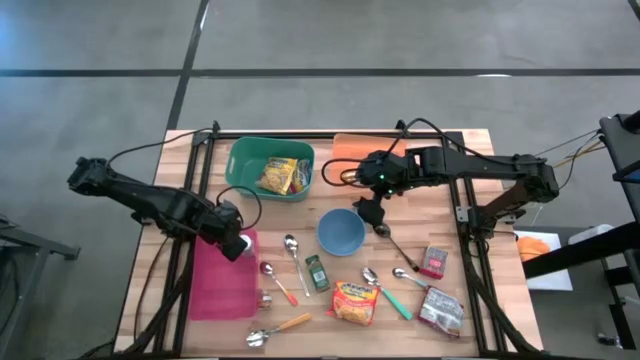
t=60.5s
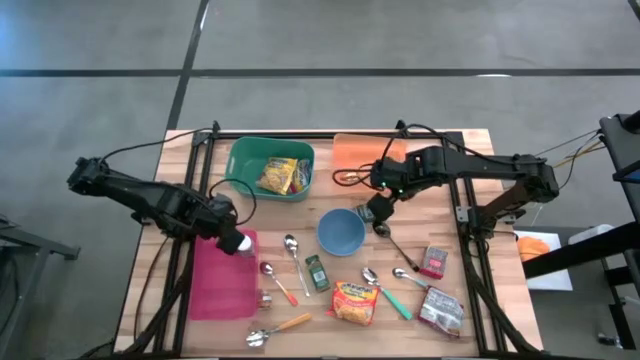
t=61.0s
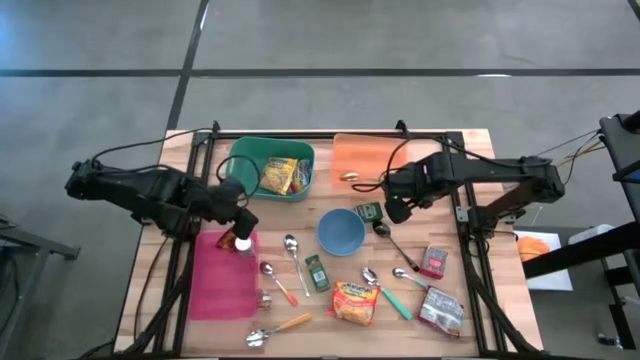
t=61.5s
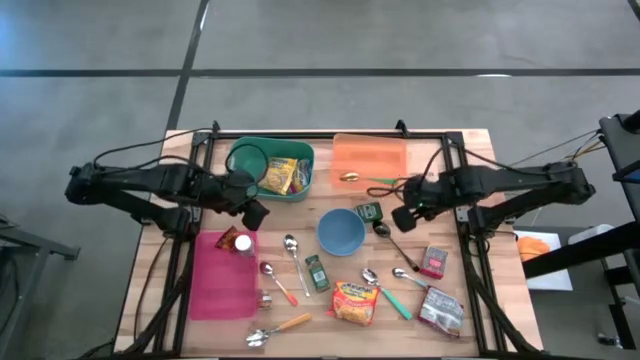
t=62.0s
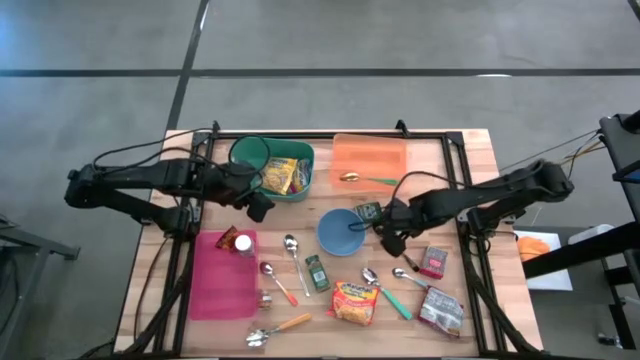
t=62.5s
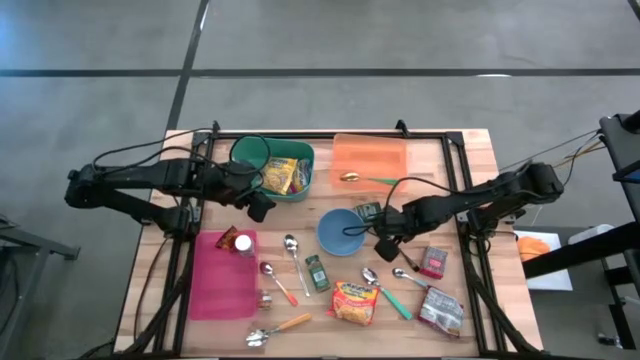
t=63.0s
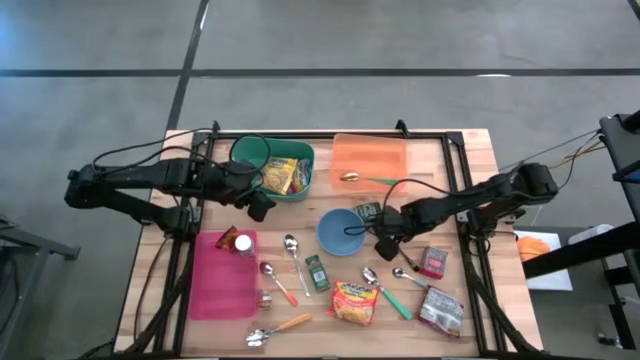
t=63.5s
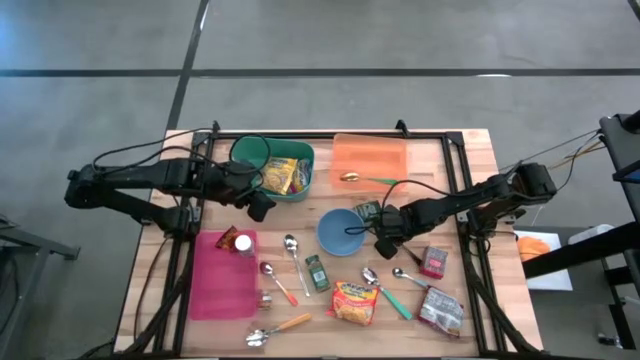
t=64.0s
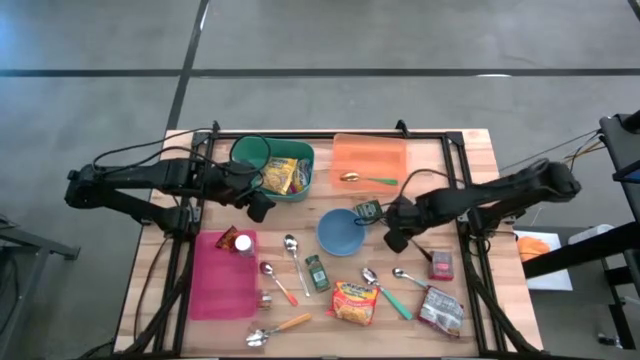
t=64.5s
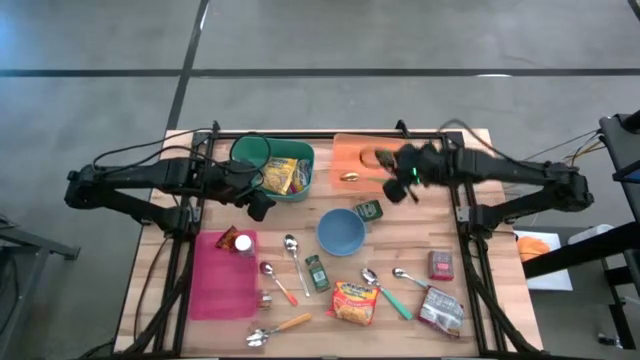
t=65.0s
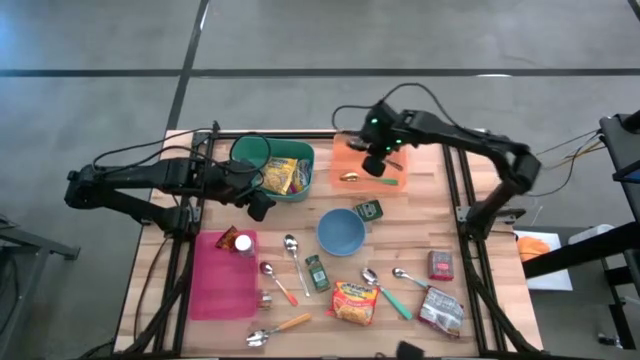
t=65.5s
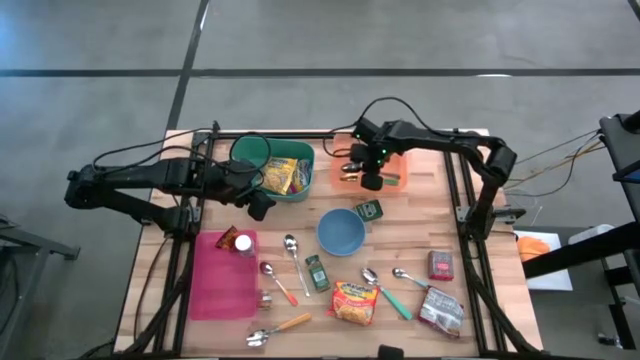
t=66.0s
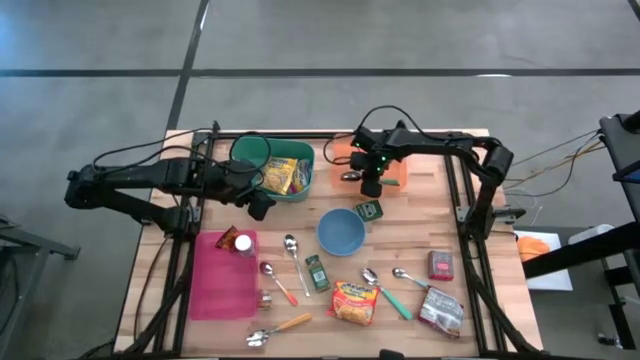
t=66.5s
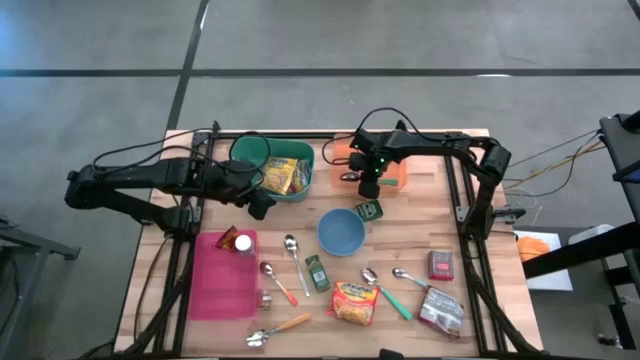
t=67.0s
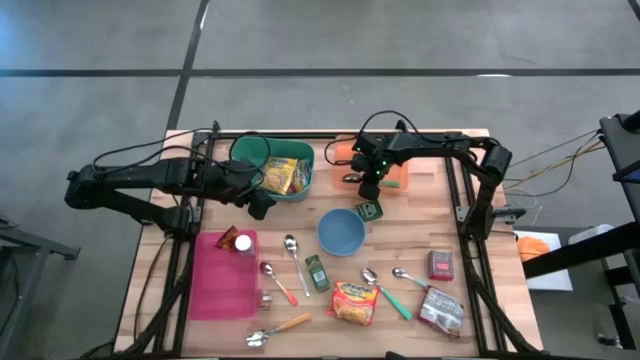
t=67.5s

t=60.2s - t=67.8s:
Put the black spoon into the orange bin

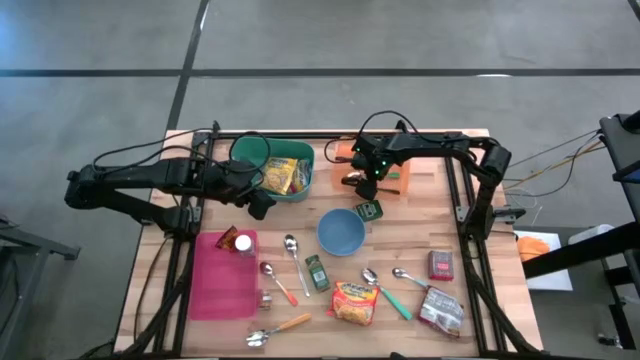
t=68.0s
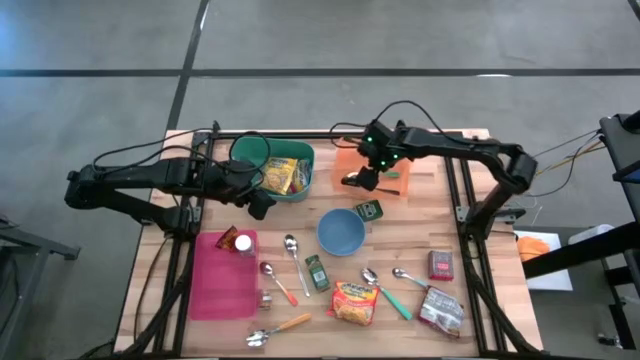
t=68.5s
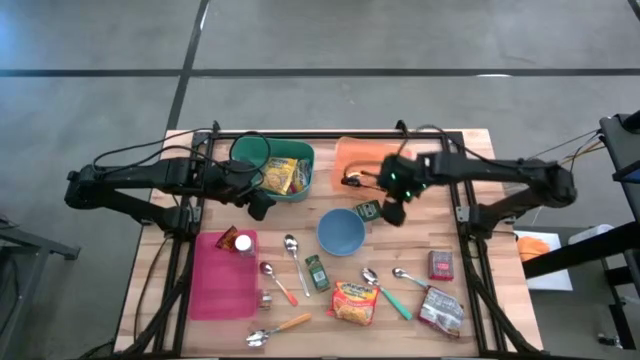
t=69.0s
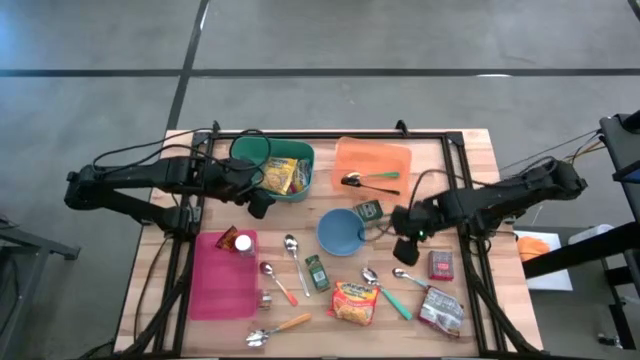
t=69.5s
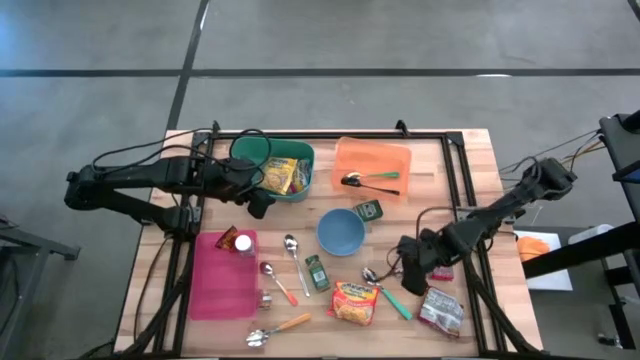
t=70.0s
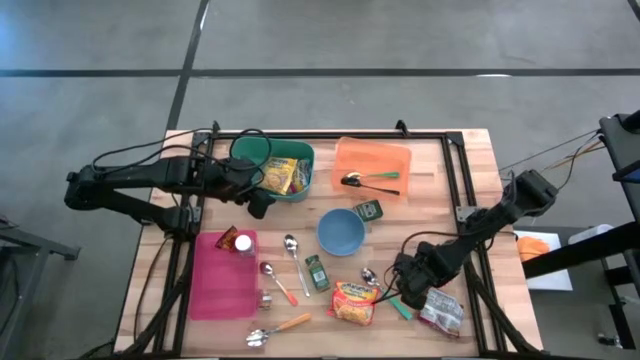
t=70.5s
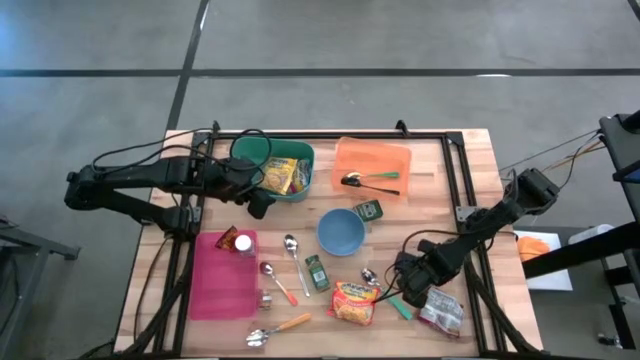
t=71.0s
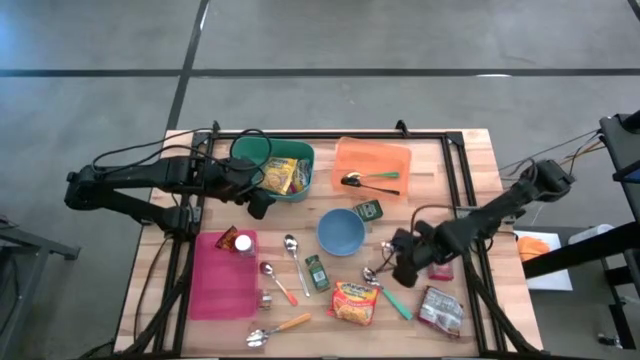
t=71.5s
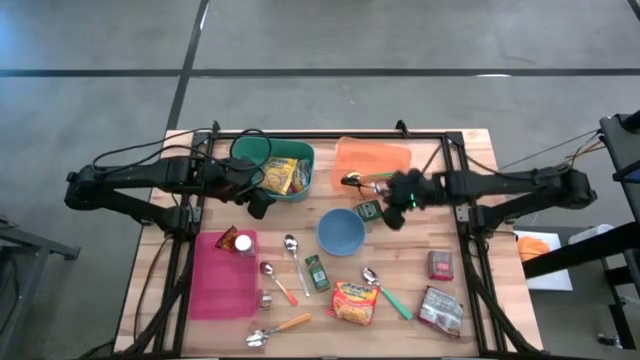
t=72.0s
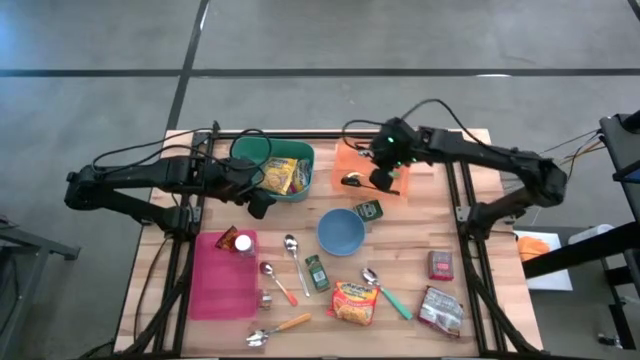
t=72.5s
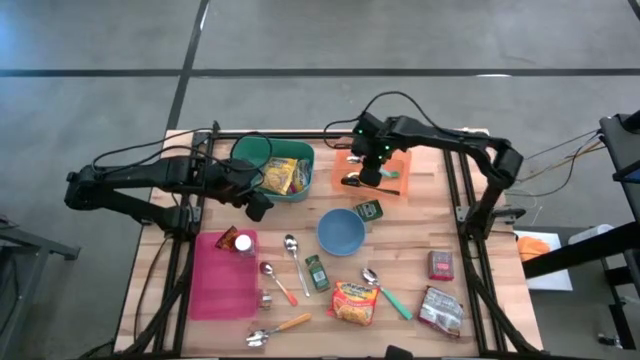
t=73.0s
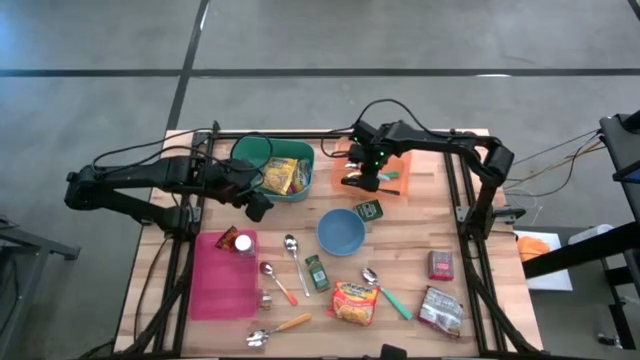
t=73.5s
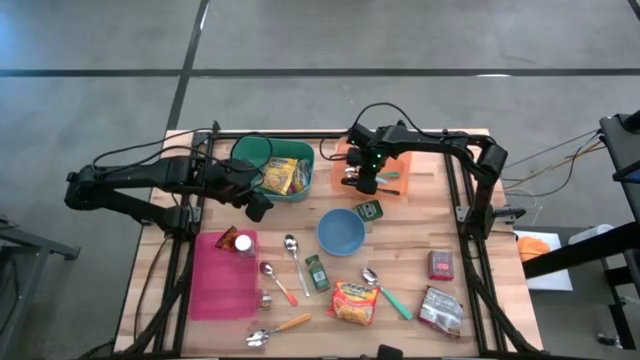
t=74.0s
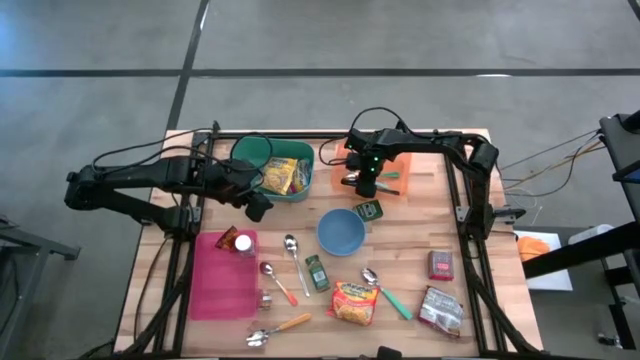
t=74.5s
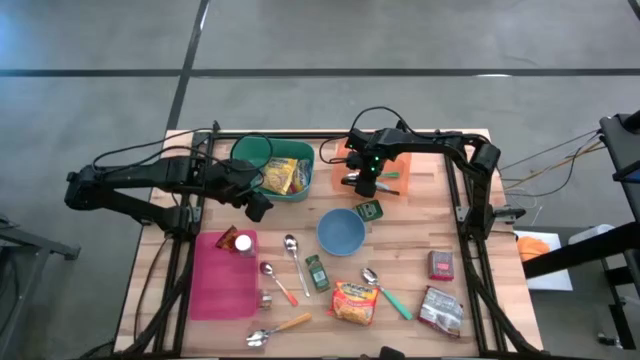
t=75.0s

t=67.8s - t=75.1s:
Put the light blue spoon into the orange bin

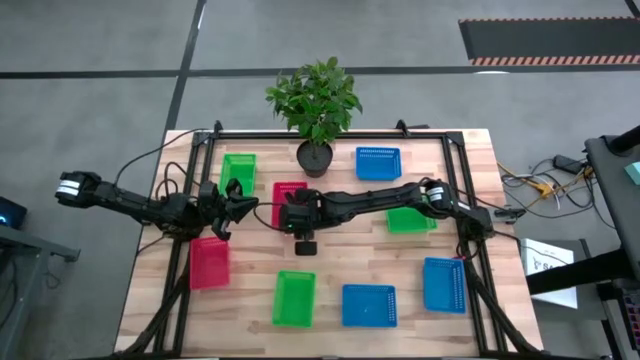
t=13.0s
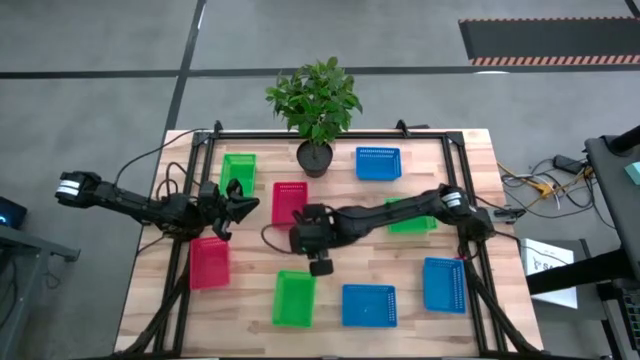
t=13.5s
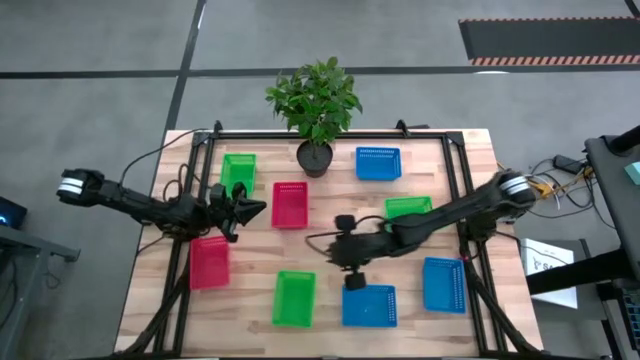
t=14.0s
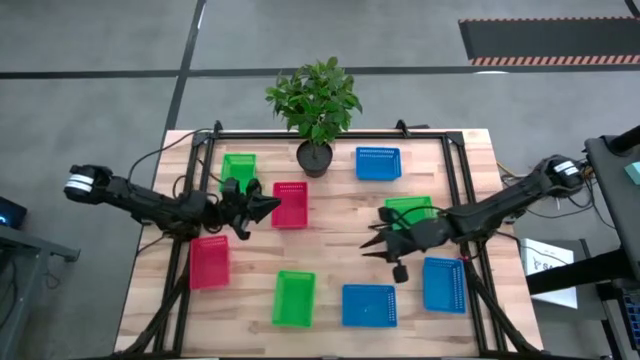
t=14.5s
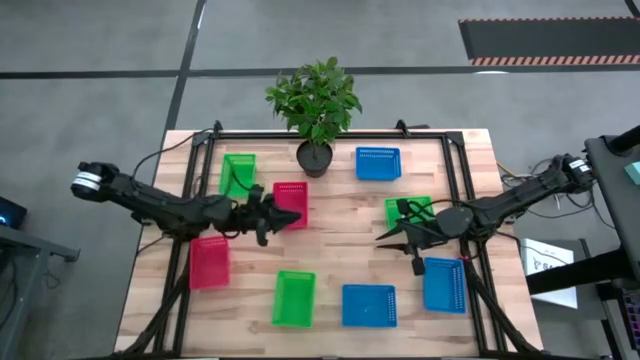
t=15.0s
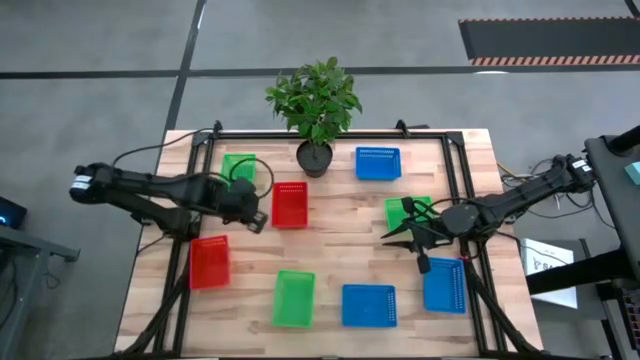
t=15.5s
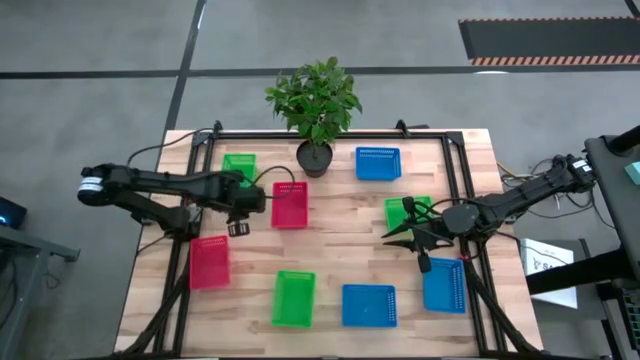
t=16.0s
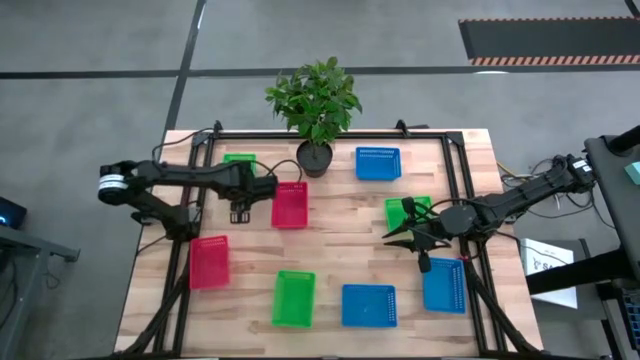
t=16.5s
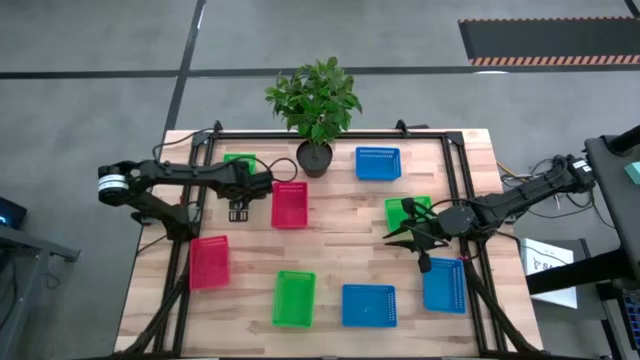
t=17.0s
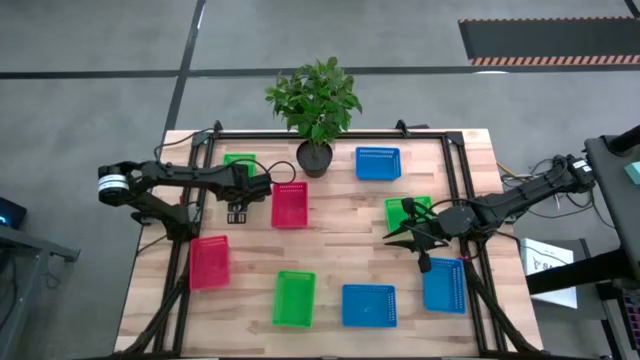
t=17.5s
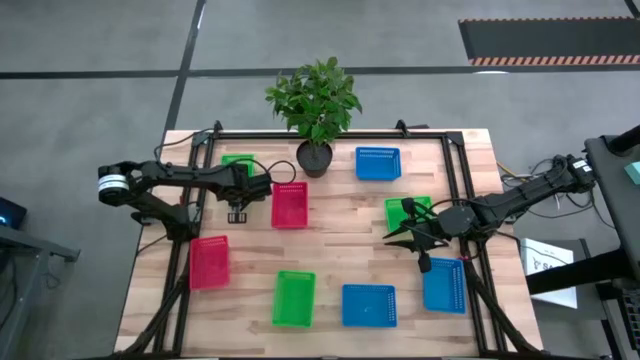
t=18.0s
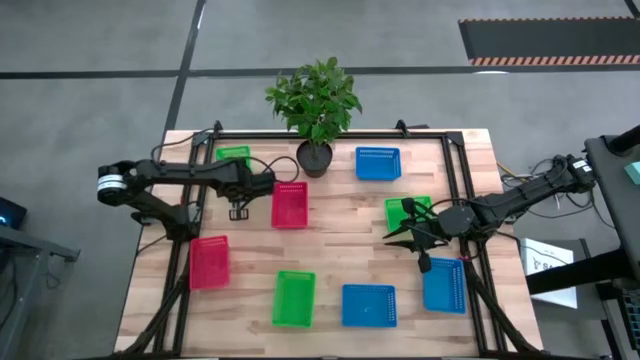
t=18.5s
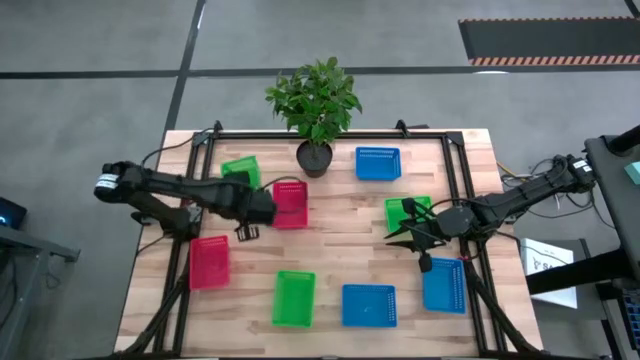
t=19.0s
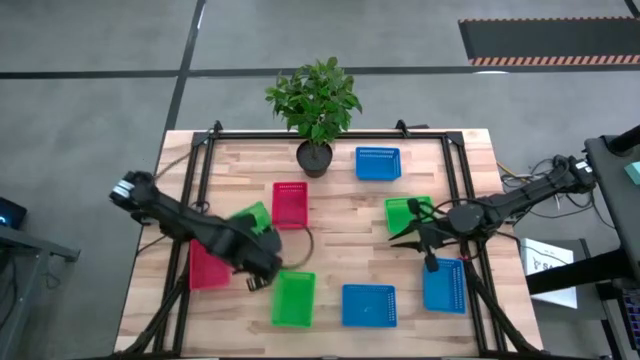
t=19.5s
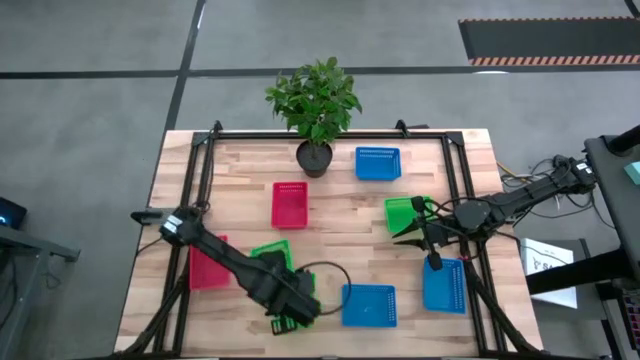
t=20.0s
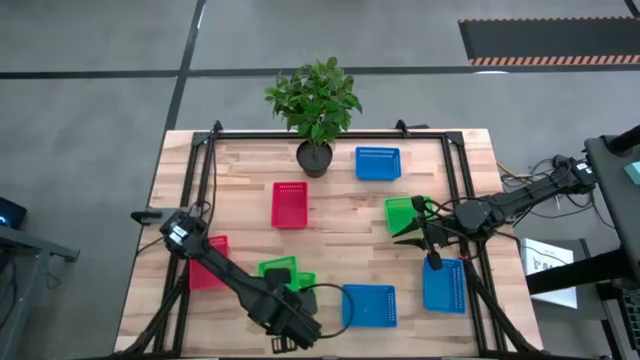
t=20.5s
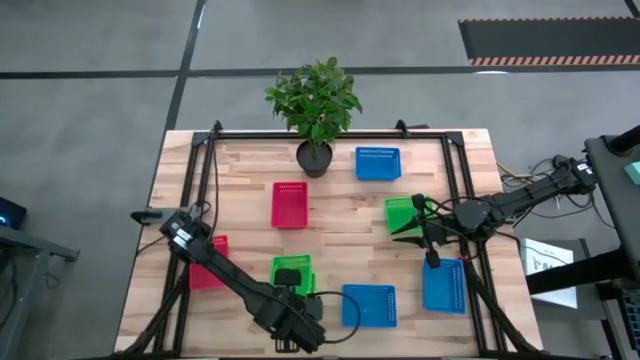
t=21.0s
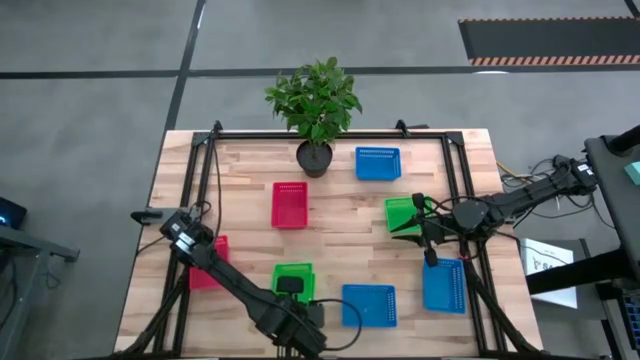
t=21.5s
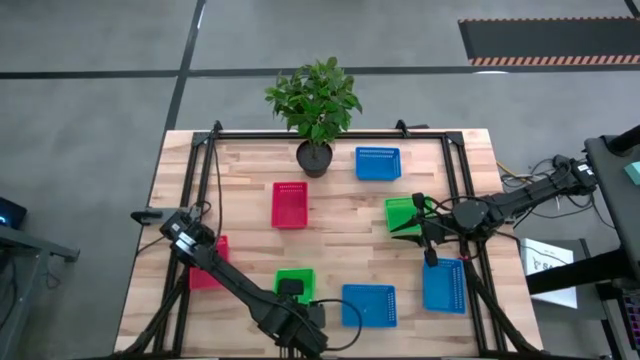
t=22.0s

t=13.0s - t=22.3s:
Stack the top green basket on top of the bottom green basket
